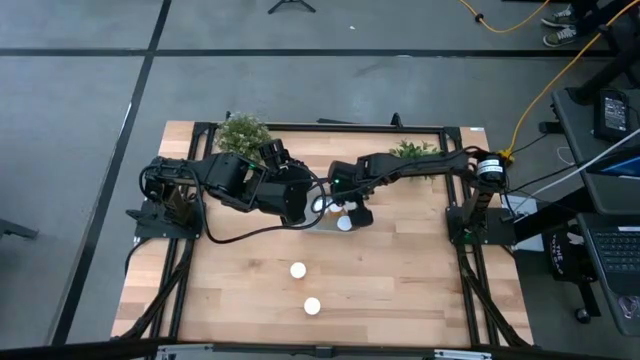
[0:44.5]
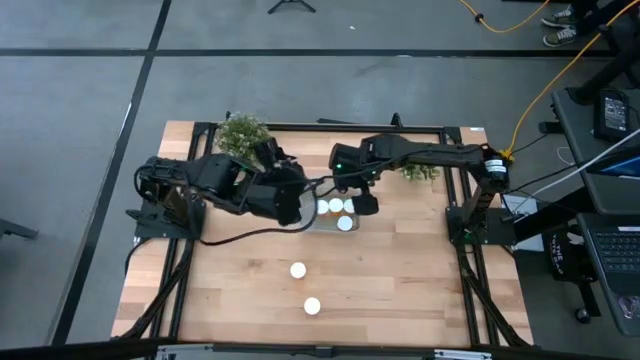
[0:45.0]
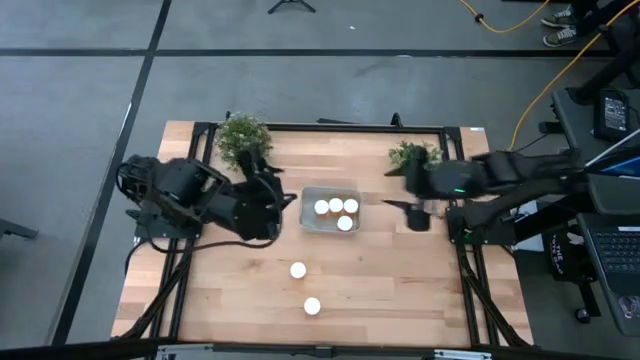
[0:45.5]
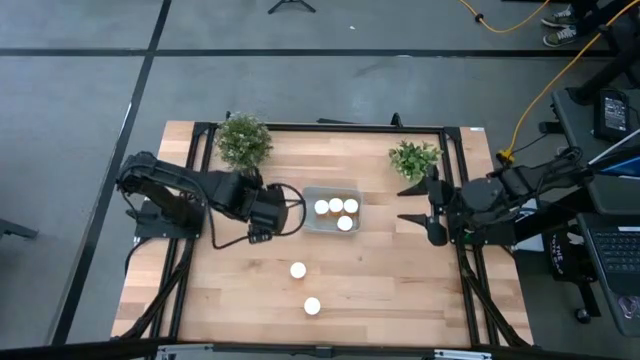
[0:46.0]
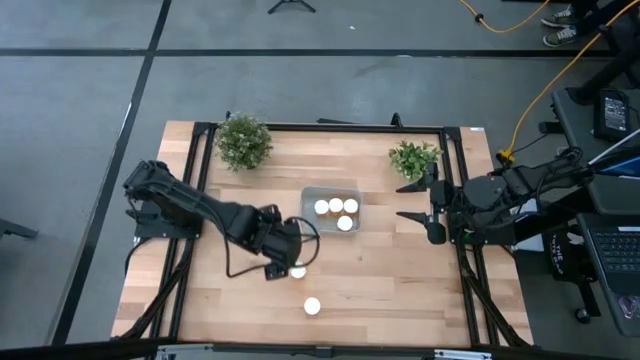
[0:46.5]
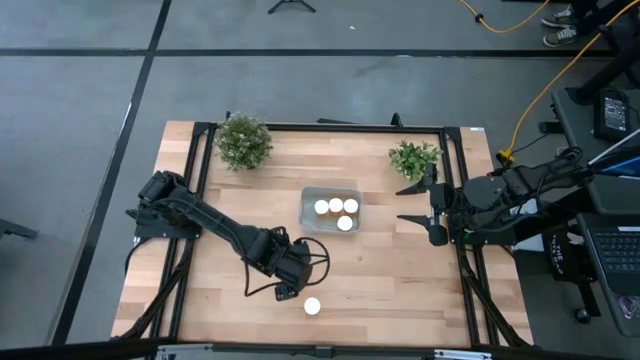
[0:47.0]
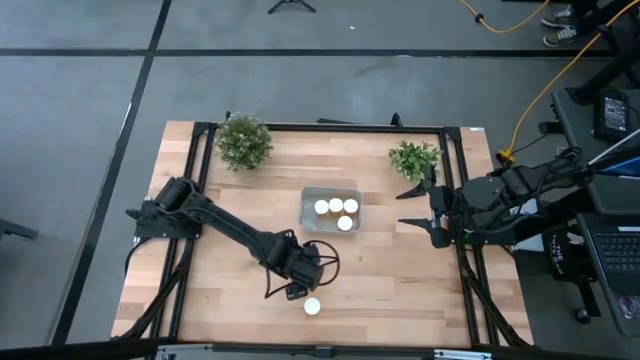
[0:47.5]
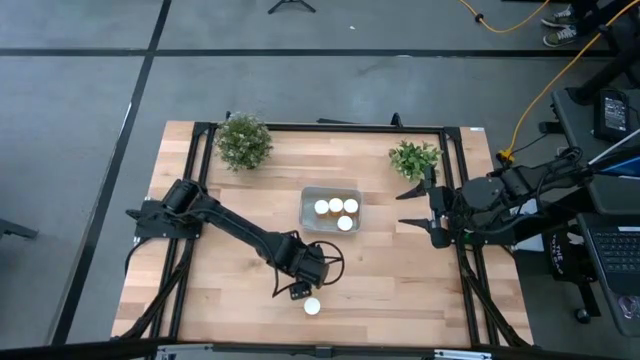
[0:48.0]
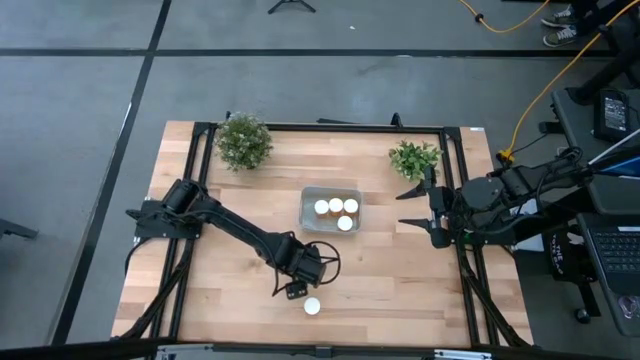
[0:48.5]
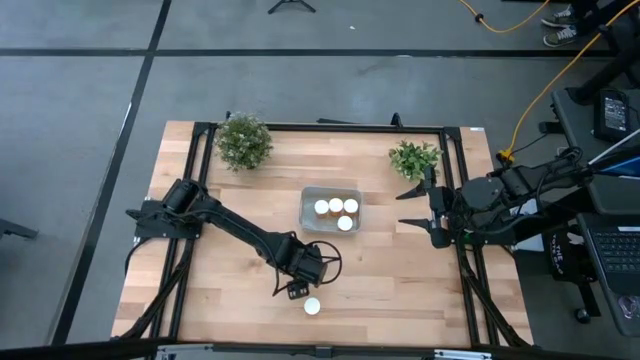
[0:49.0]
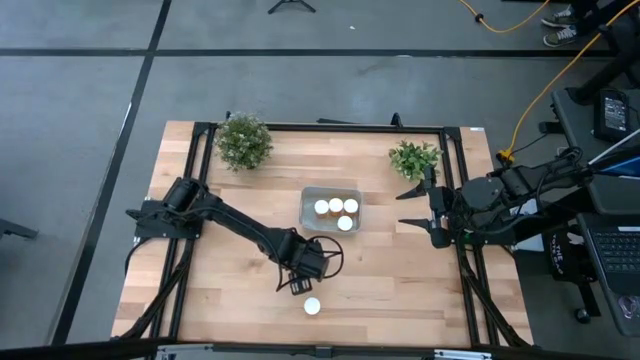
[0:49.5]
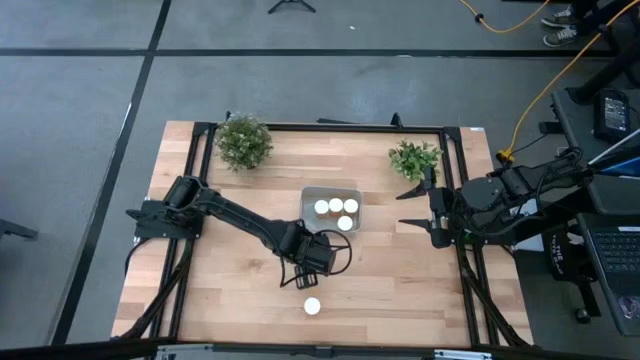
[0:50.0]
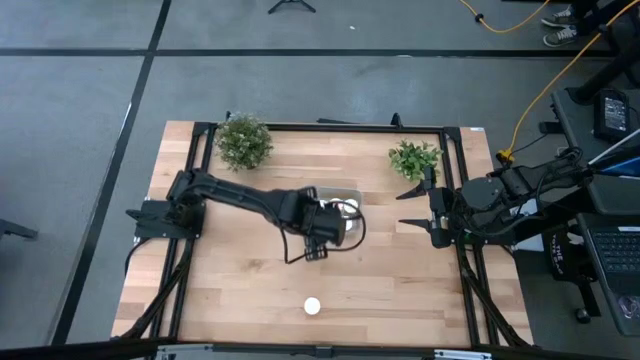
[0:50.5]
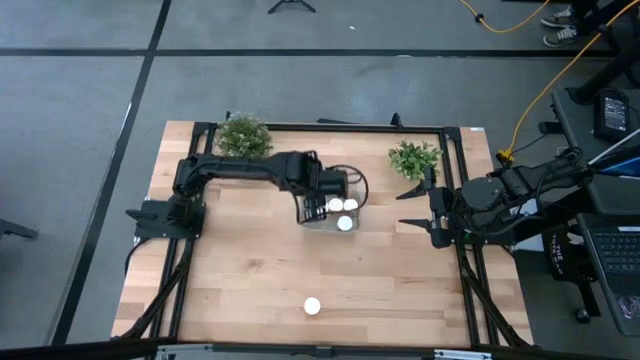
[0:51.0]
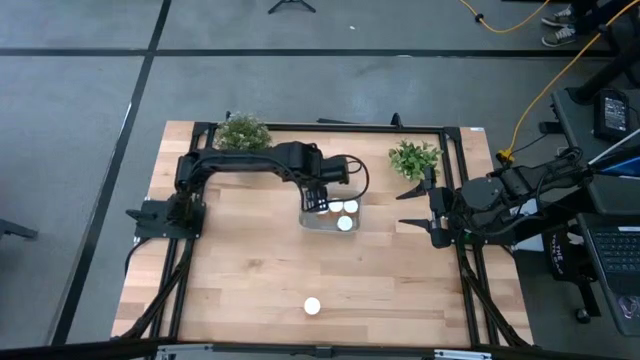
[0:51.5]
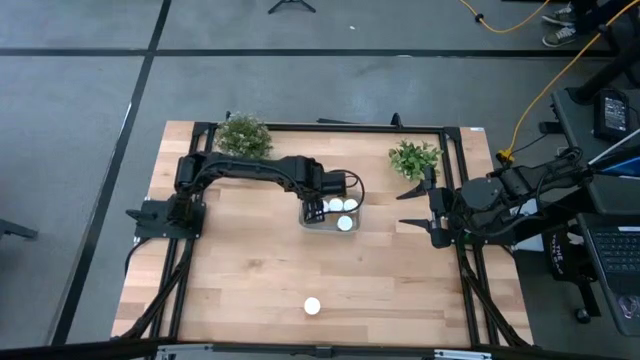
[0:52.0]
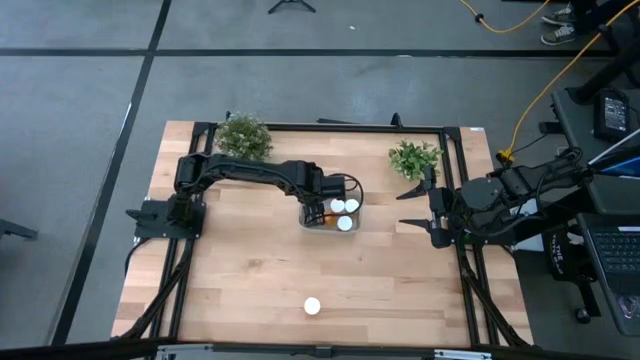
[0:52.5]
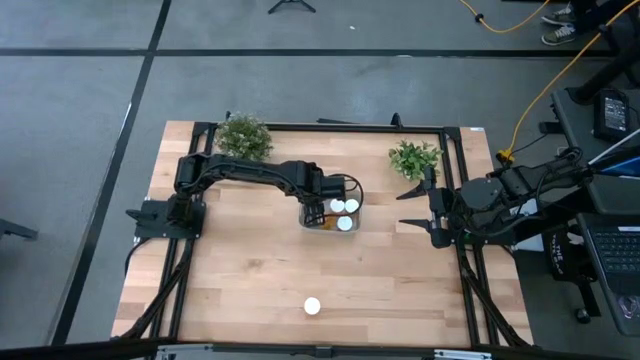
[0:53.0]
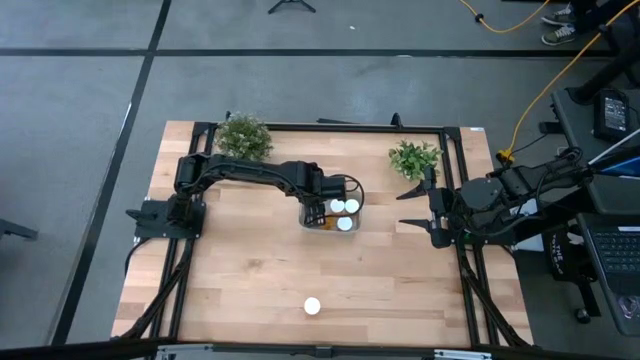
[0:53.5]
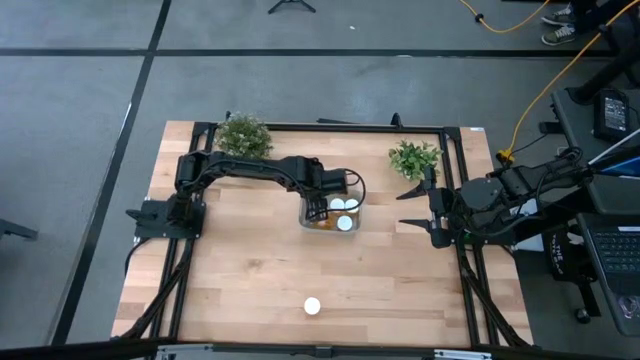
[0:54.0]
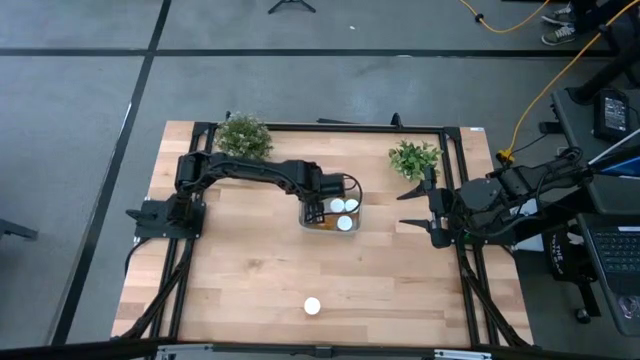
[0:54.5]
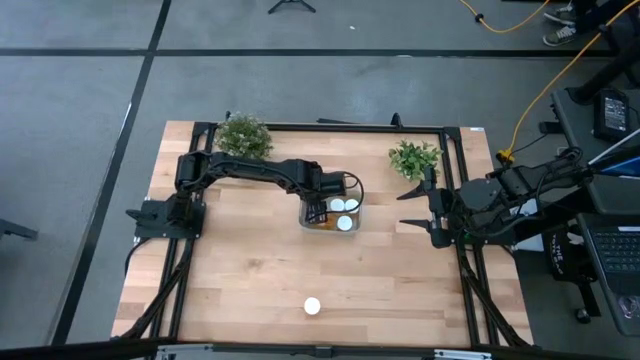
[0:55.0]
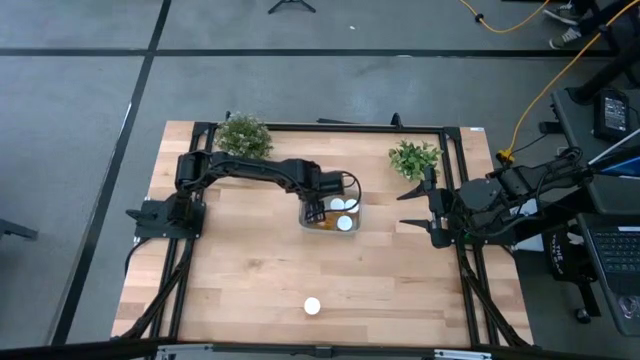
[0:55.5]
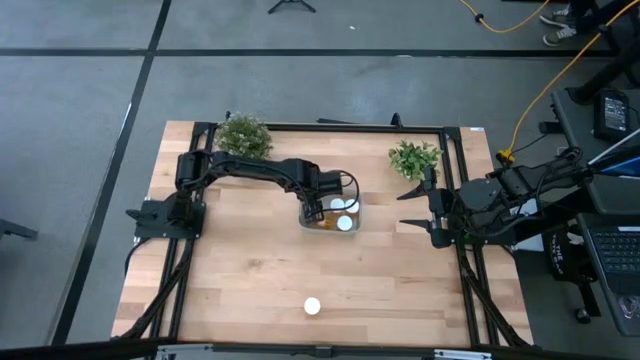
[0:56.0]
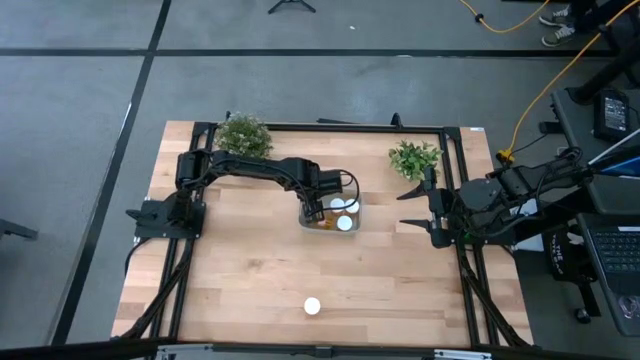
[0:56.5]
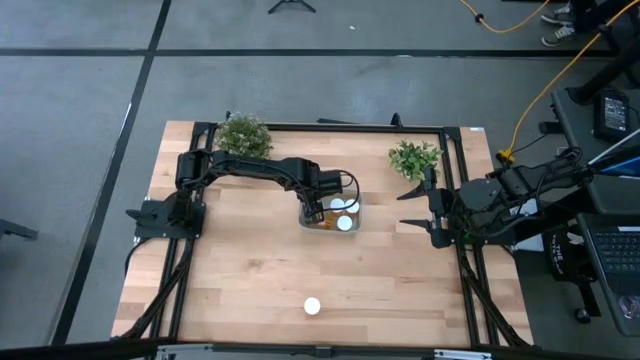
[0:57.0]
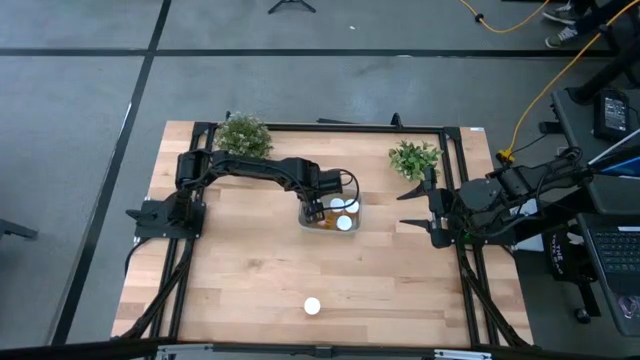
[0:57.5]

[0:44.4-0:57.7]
Task: Pick and place pill bottles into a basket
Put the top orange pill bottle into the gray bin

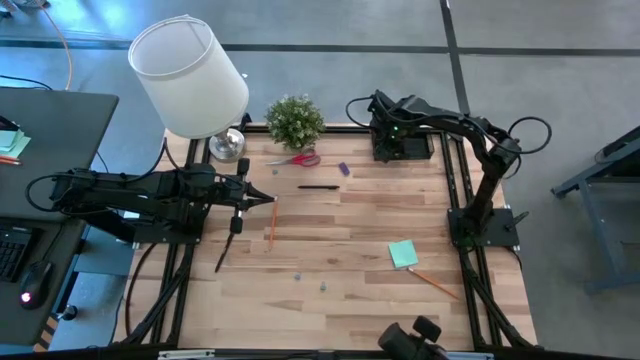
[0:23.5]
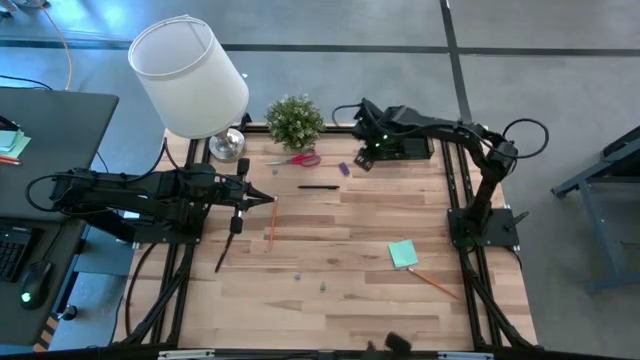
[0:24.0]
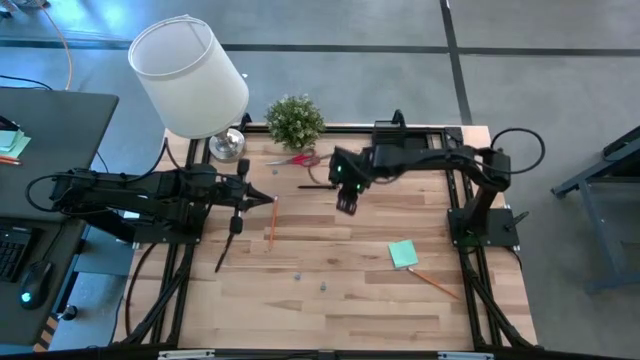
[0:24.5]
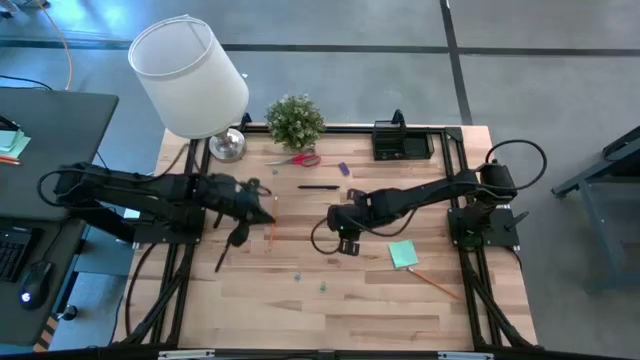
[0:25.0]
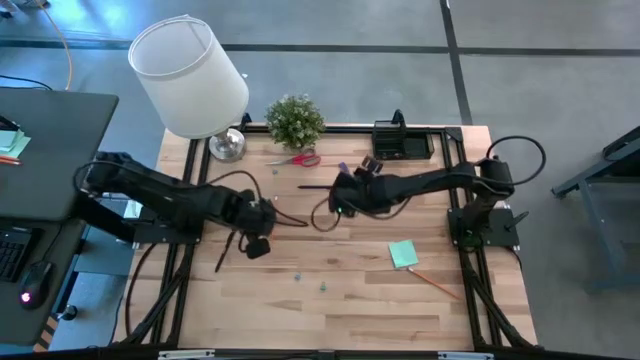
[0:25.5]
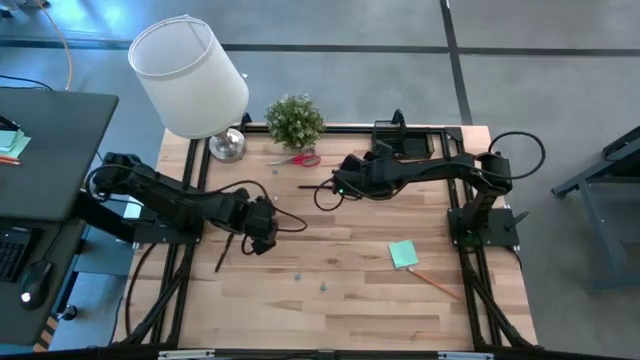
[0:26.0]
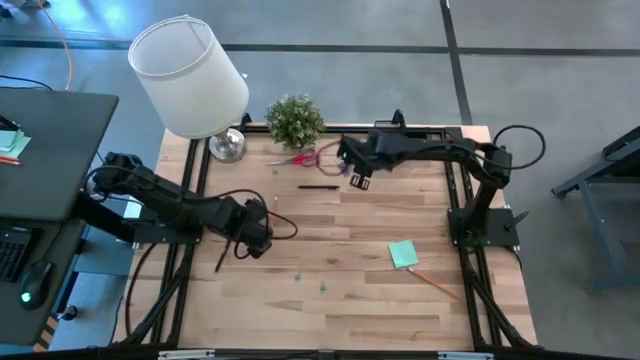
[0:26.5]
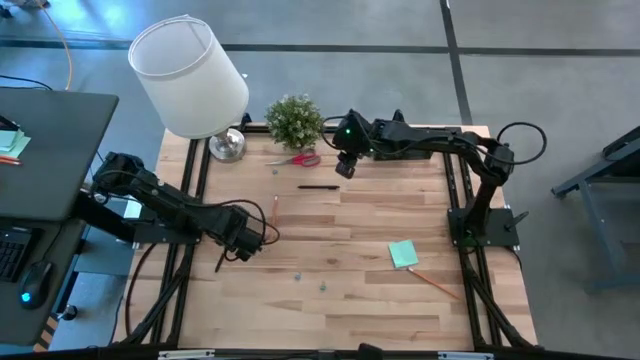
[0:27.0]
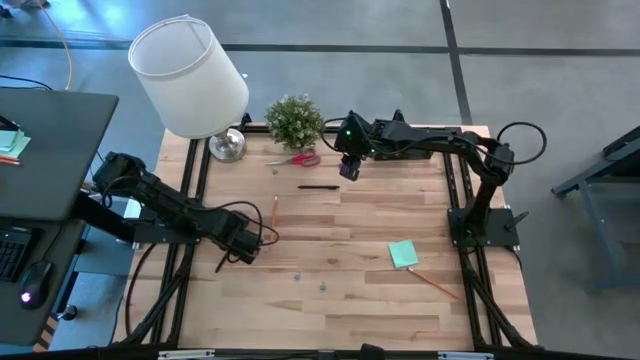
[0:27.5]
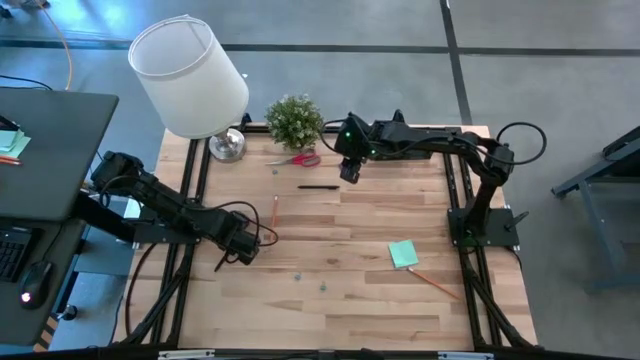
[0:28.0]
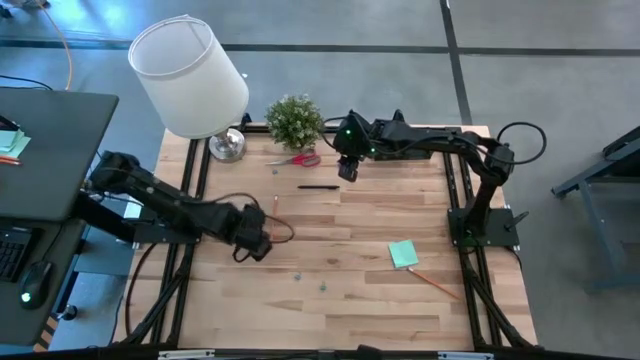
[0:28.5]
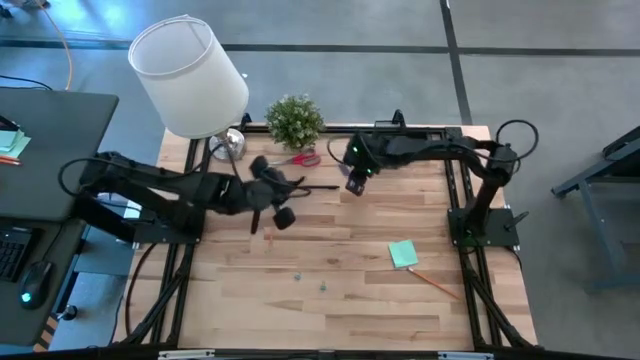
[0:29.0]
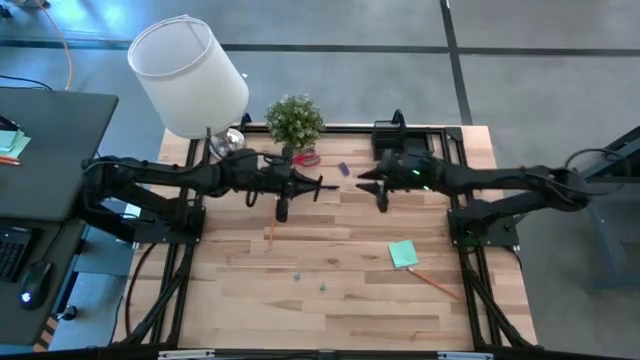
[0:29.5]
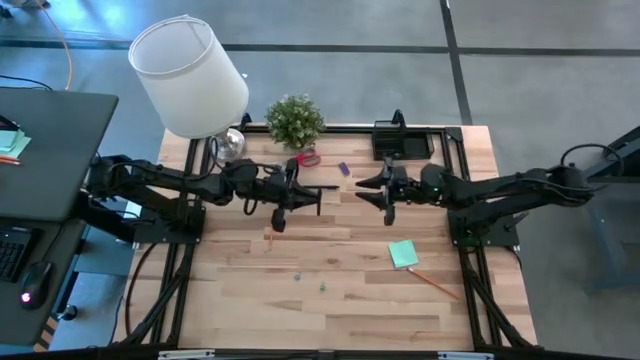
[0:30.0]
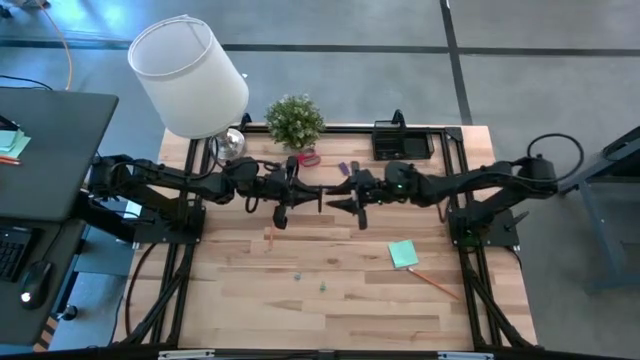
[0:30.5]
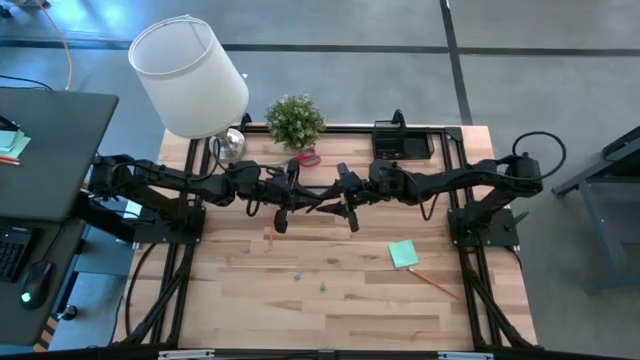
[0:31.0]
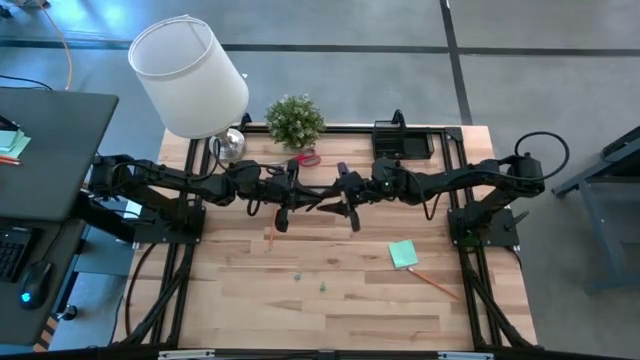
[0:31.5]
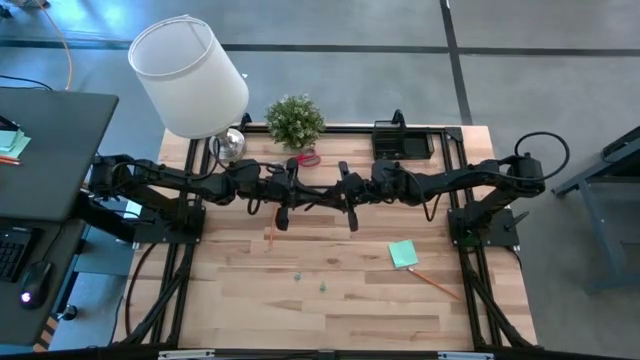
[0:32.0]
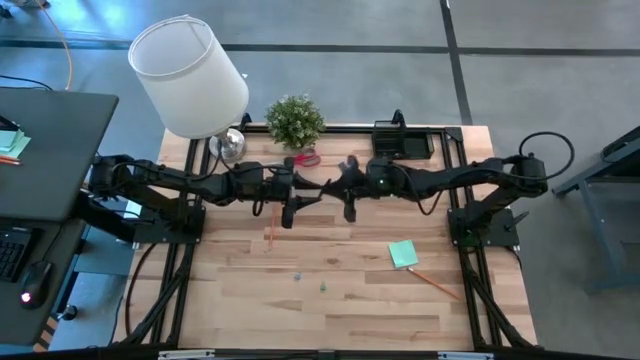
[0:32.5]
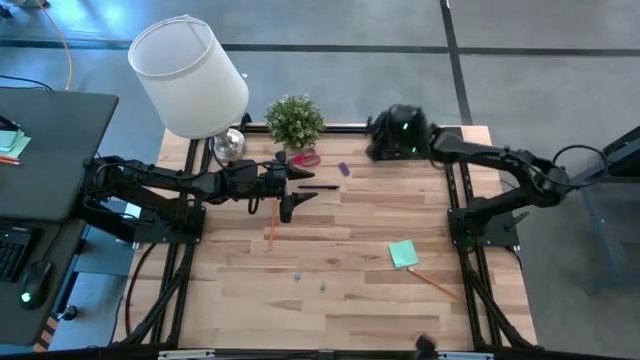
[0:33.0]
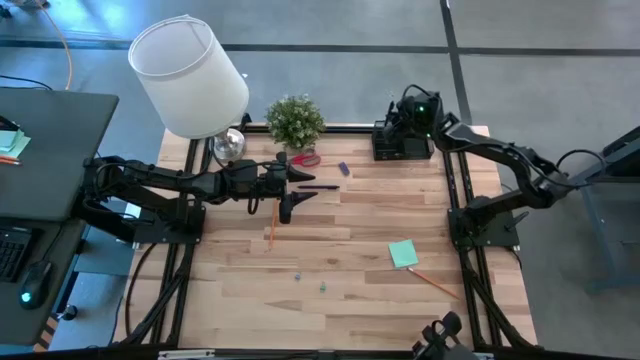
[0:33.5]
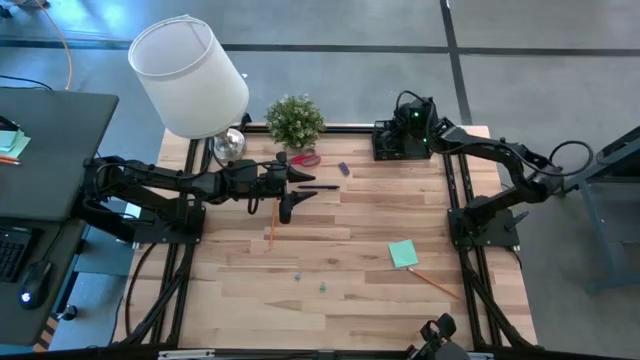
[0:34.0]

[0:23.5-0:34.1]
Task: Pick and place office supplies into organizer
Put the bottom black pen in the black desk organizer
